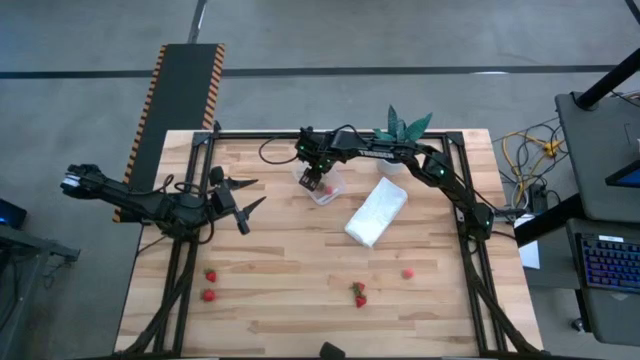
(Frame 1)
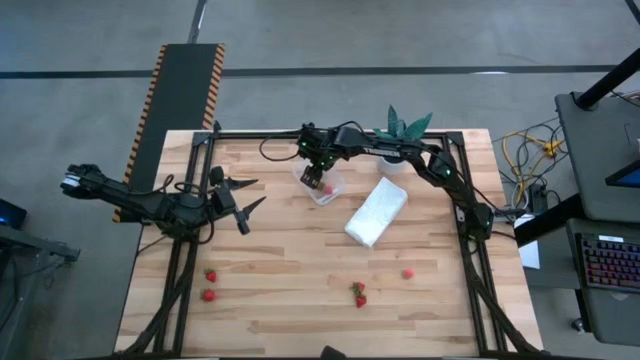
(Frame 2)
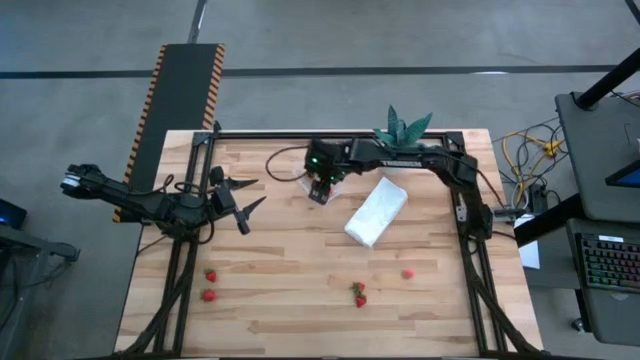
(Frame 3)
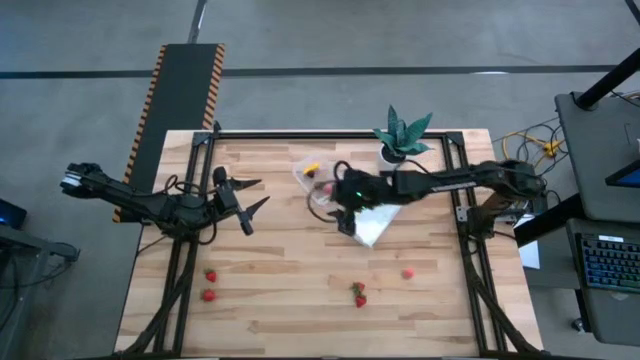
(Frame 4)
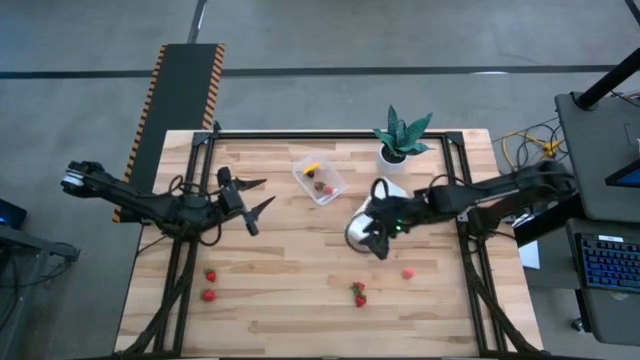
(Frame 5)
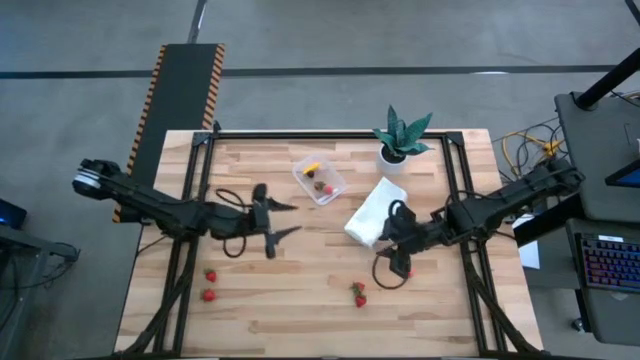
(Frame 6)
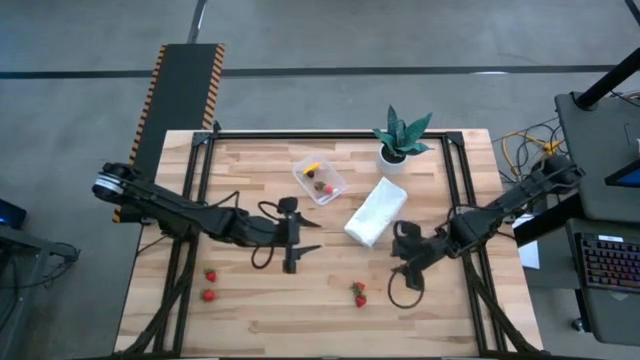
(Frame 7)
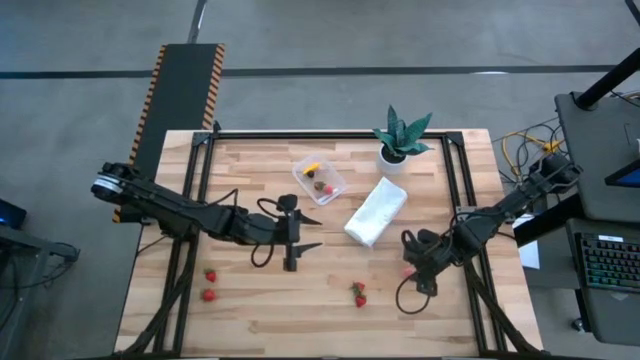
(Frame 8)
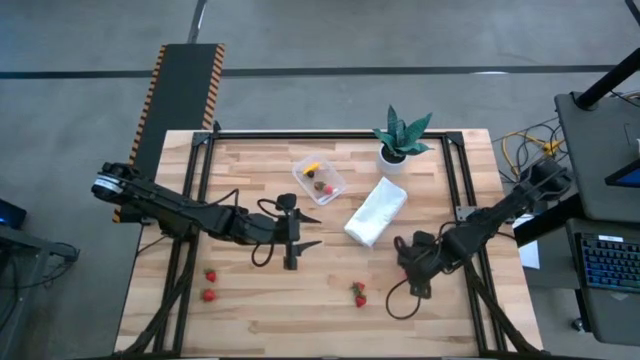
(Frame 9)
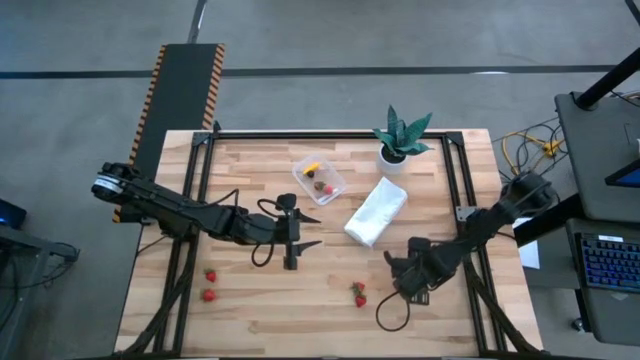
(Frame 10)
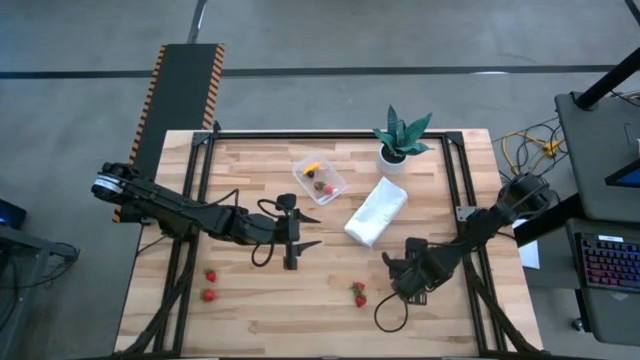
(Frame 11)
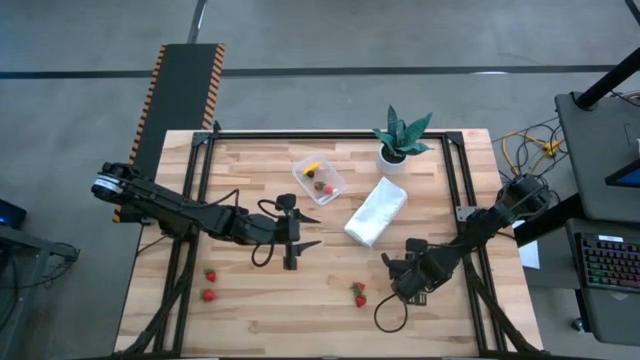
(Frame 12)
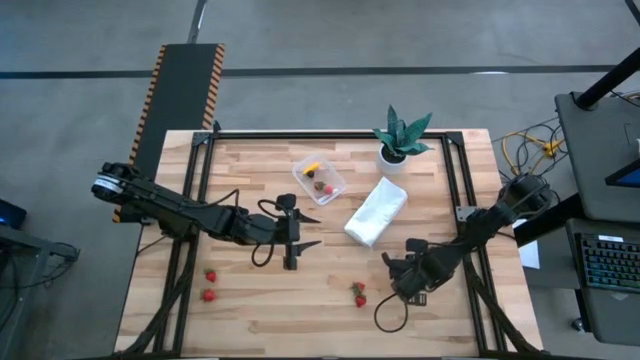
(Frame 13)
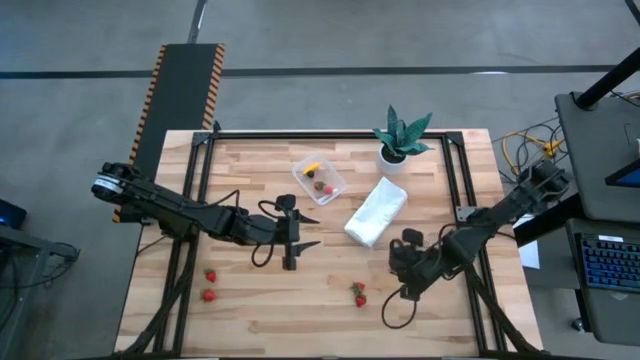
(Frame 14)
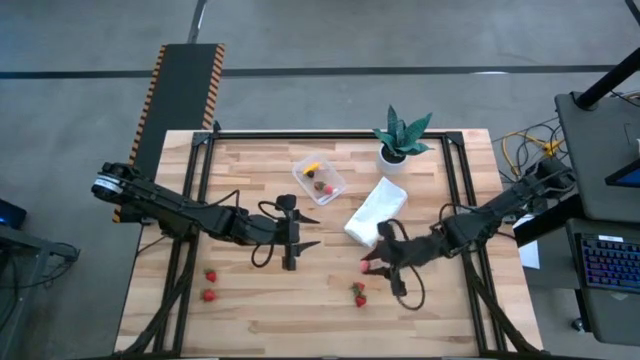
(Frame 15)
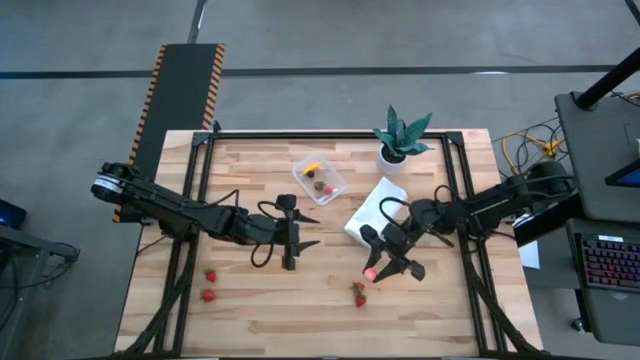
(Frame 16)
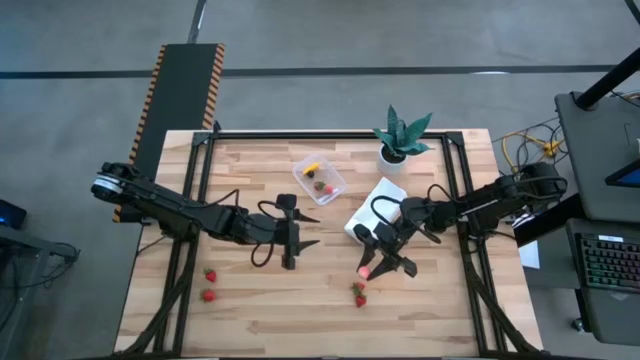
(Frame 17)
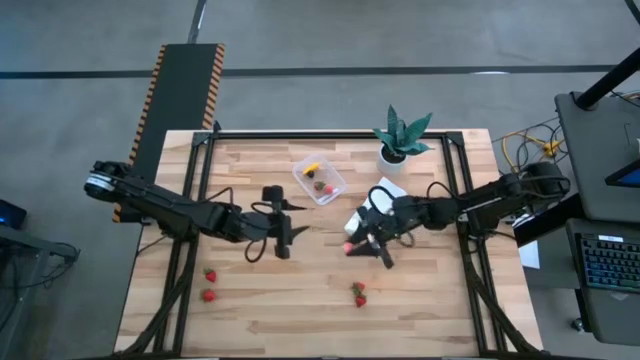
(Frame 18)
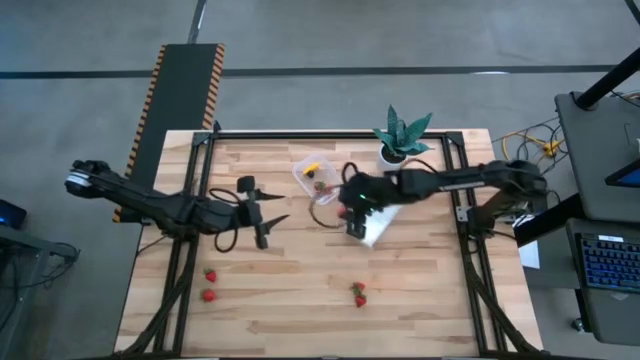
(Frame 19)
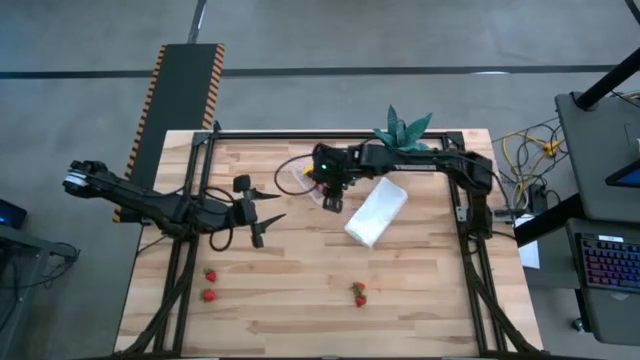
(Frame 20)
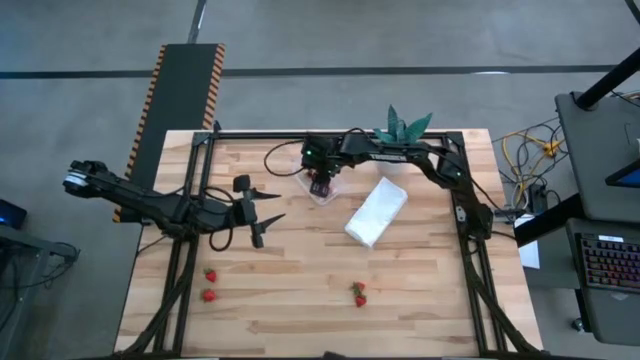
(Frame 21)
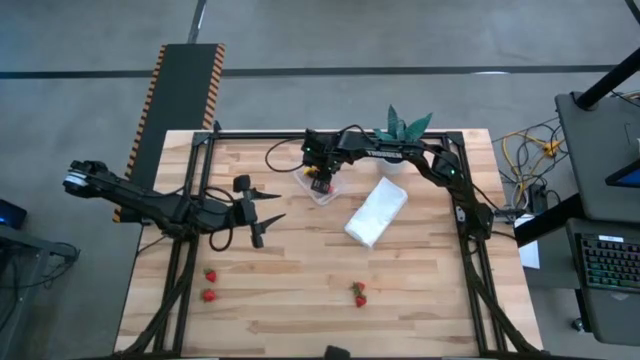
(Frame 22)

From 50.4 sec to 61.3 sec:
Task: Pick and placing Produce into tupperware
Put the apricot into the transparent bin

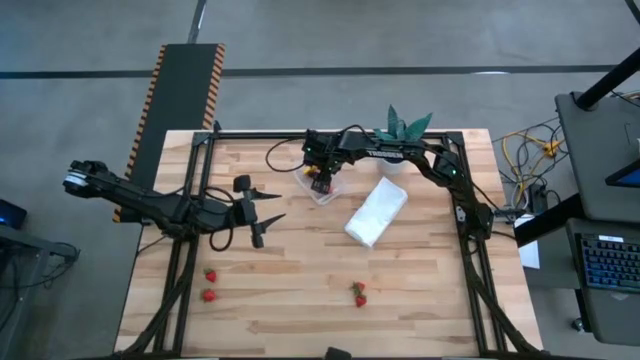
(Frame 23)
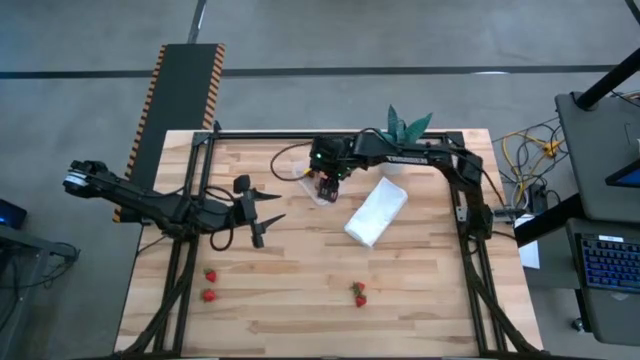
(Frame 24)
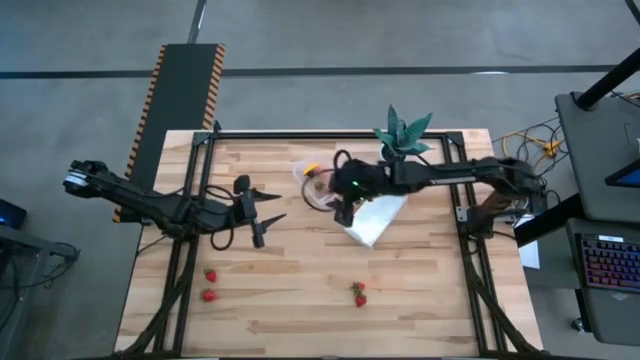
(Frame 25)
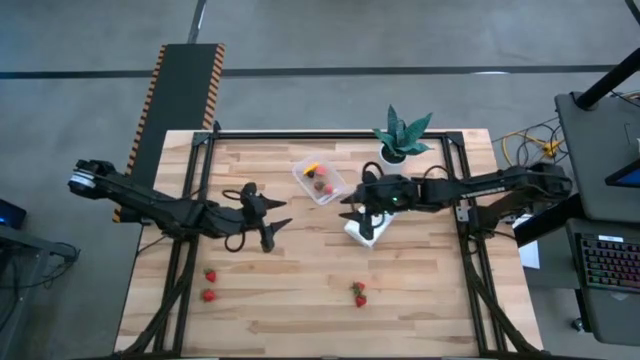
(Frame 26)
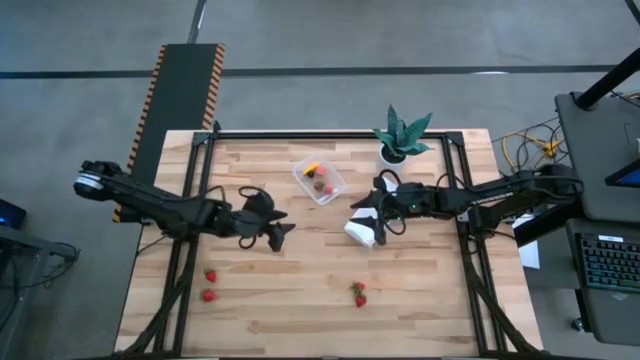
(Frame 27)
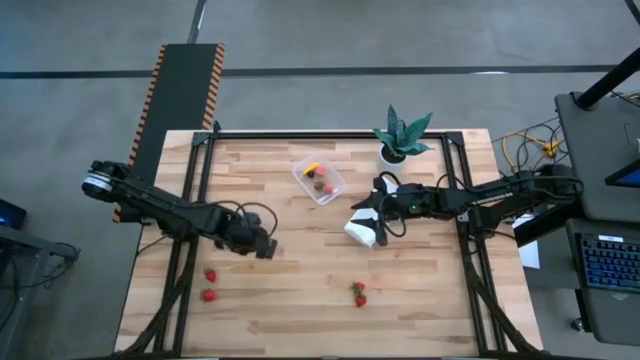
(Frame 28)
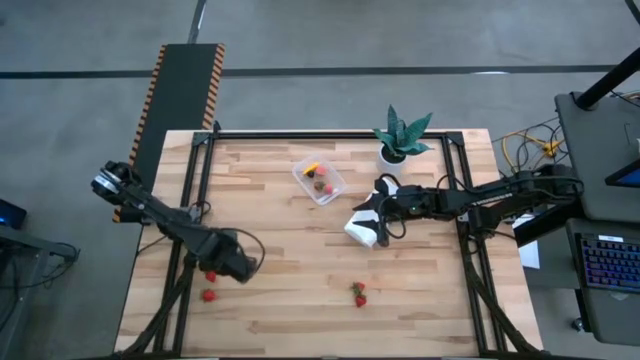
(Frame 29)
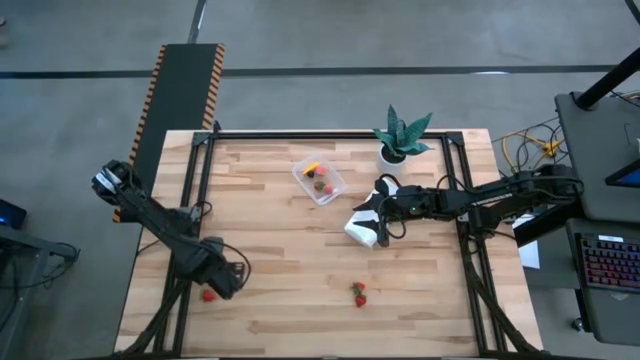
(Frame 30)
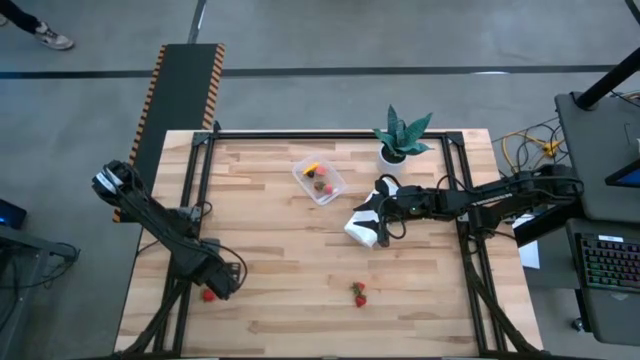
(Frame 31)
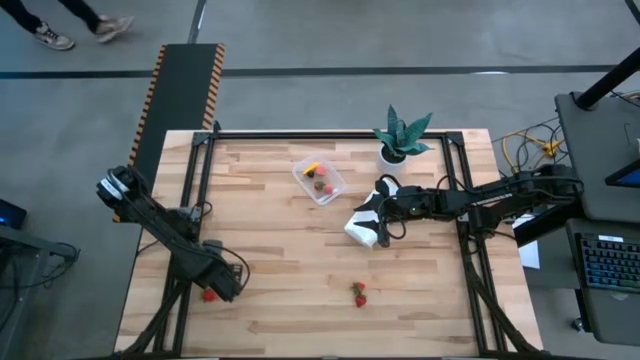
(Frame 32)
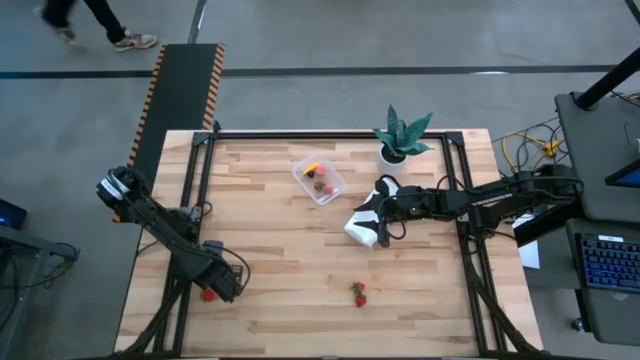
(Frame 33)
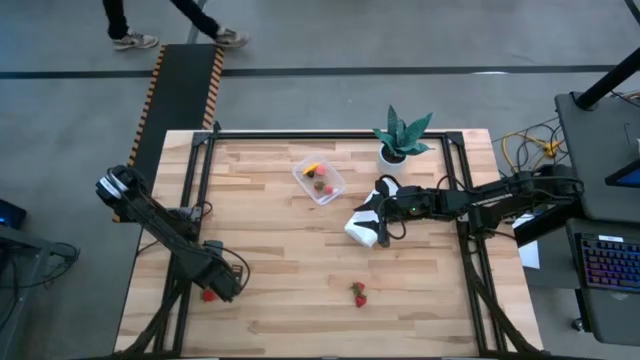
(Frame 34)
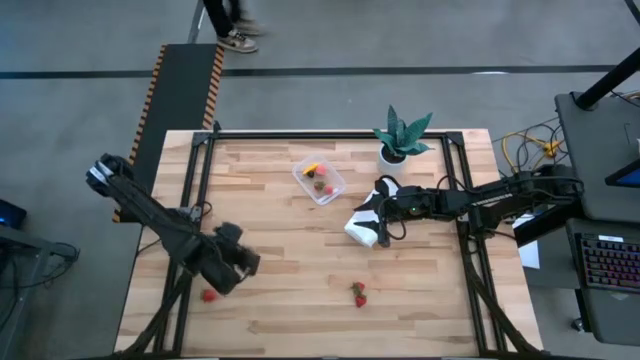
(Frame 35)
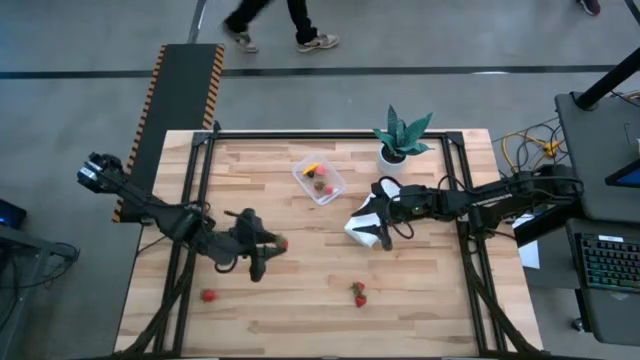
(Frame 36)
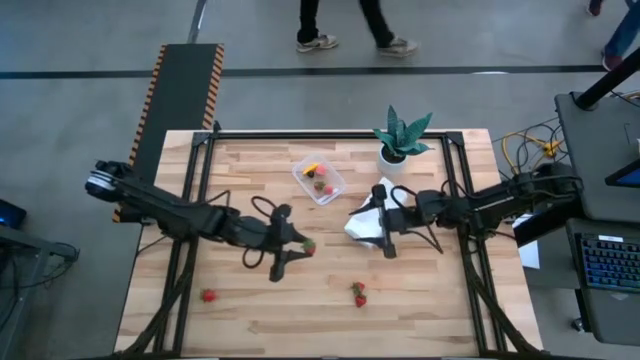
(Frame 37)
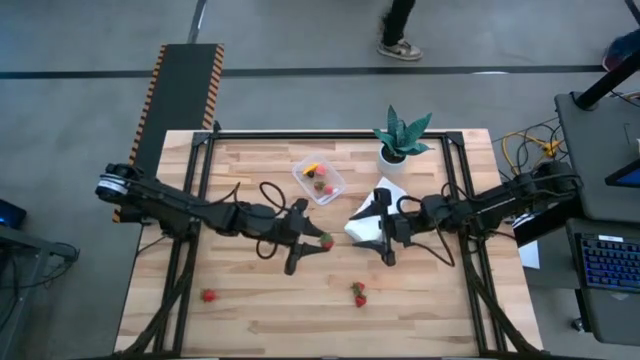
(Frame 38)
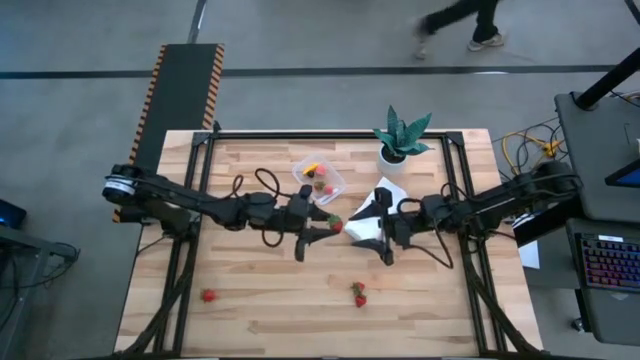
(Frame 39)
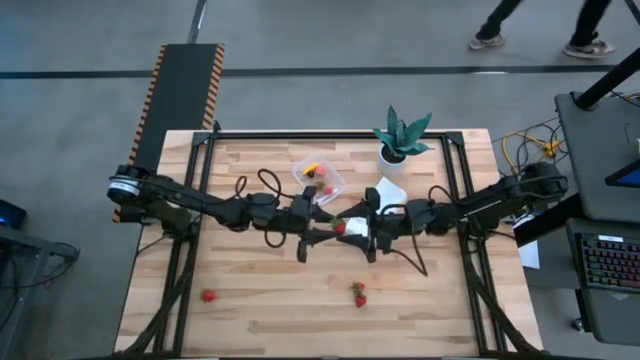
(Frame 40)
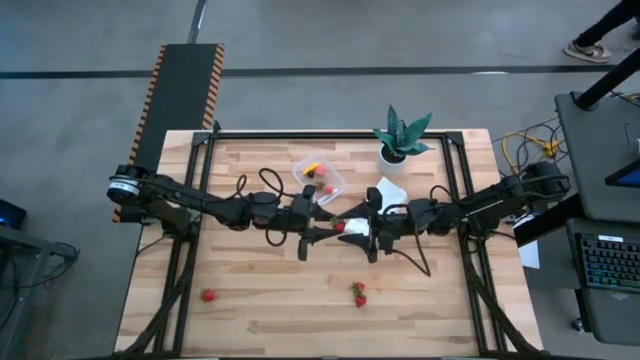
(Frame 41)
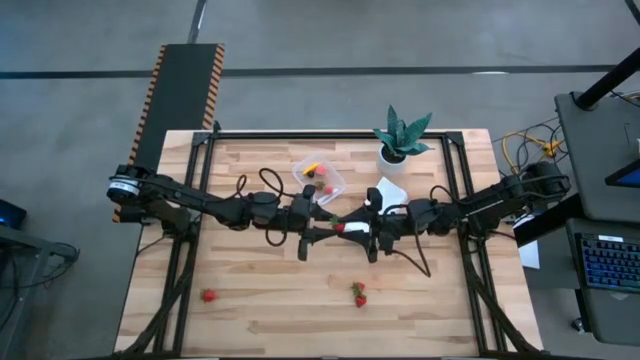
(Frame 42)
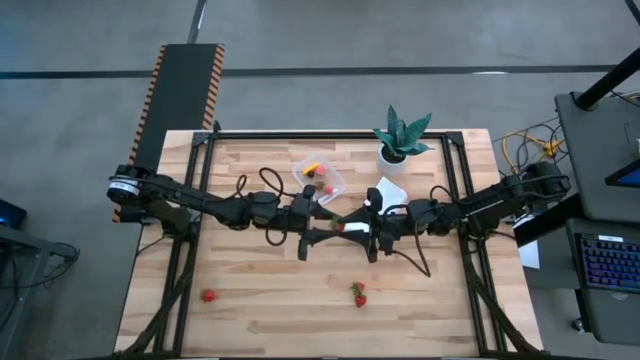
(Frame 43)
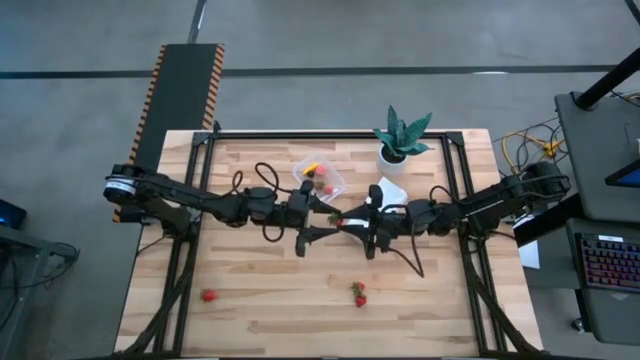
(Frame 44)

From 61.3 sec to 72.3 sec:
Put the strawberry into the transparent bin

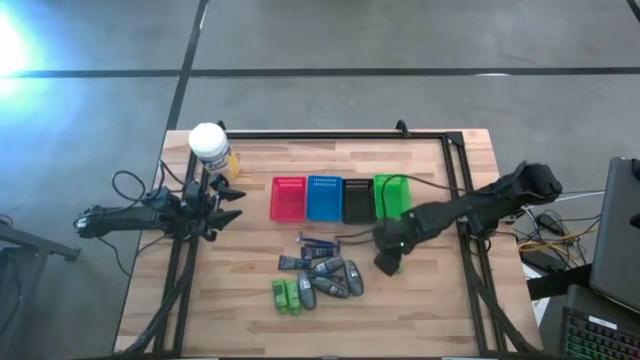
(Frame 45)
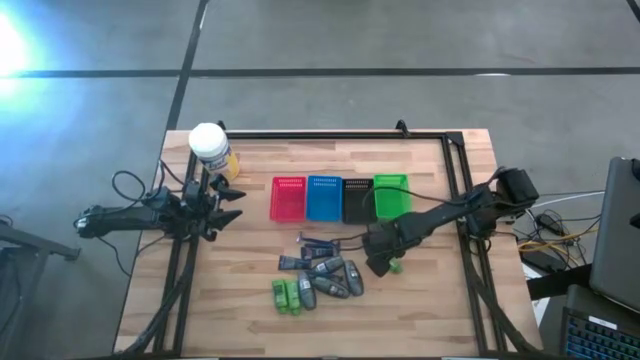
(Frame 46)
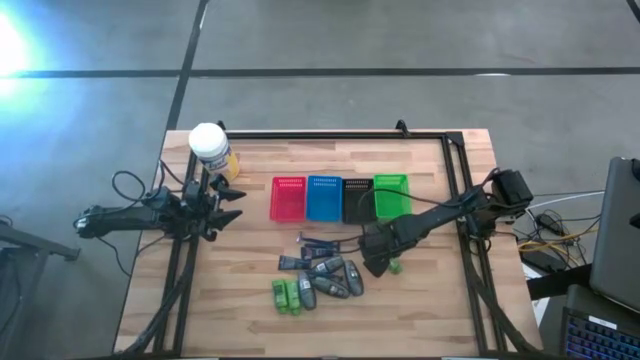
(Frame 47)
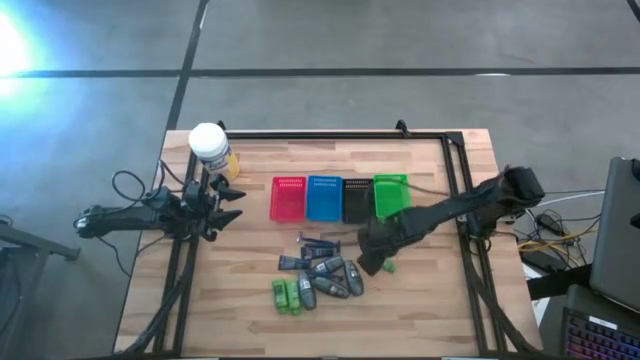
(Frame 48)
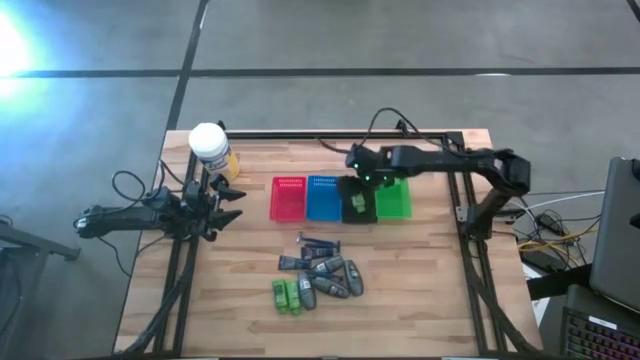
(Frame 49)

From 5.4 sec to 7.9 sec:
Task: Pick & Place Travel size toiletries
Put the shampoo into the black basket
